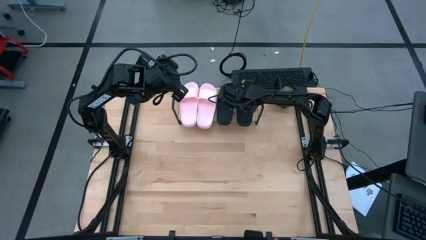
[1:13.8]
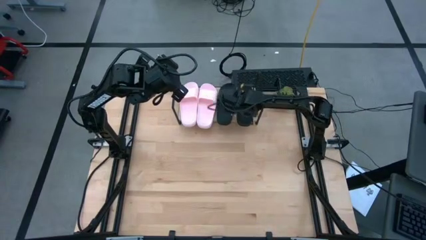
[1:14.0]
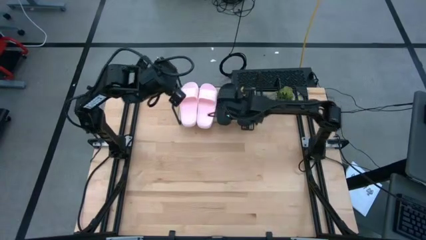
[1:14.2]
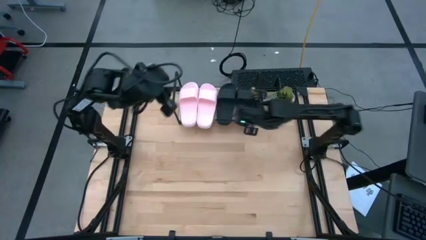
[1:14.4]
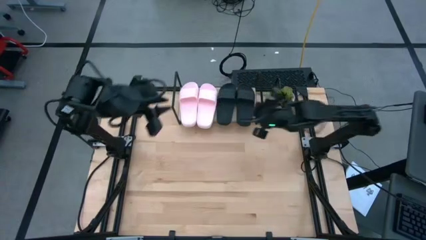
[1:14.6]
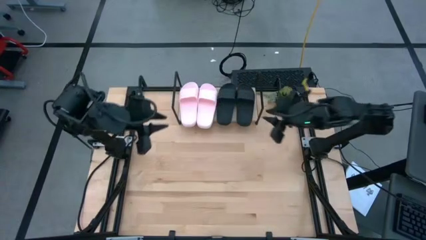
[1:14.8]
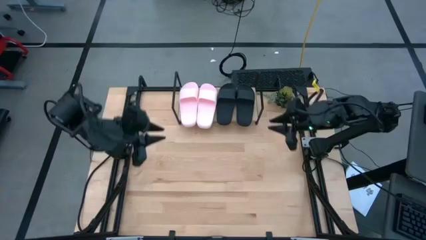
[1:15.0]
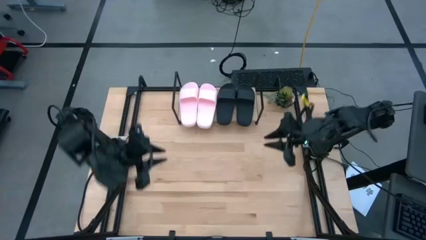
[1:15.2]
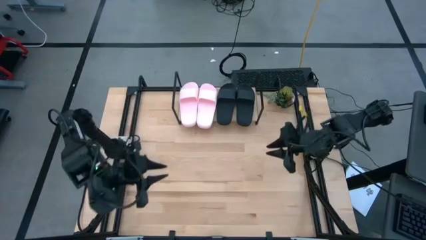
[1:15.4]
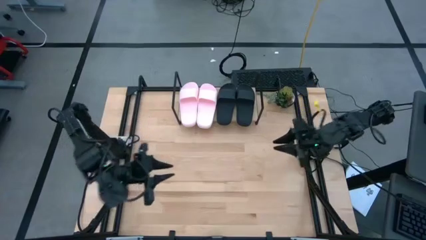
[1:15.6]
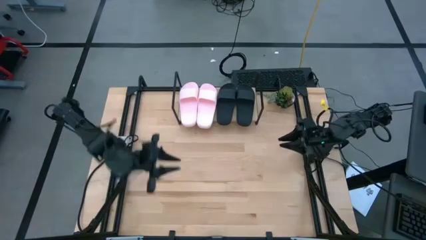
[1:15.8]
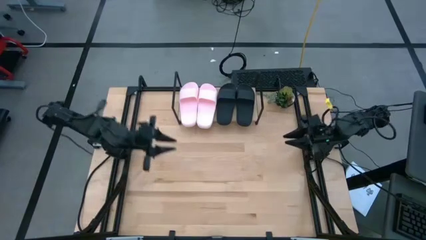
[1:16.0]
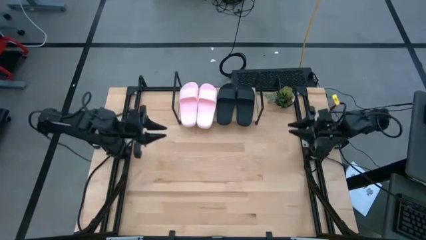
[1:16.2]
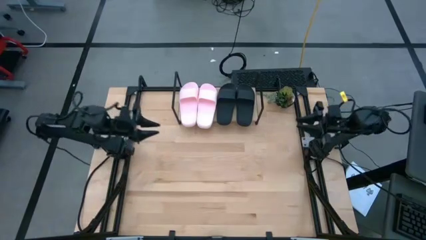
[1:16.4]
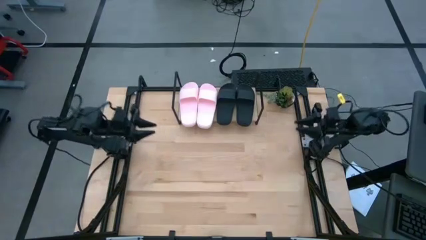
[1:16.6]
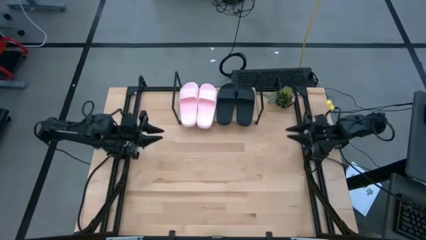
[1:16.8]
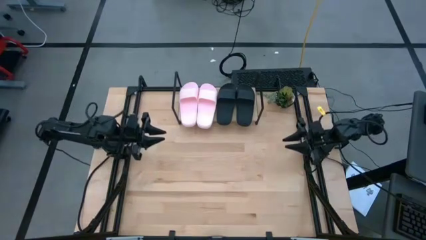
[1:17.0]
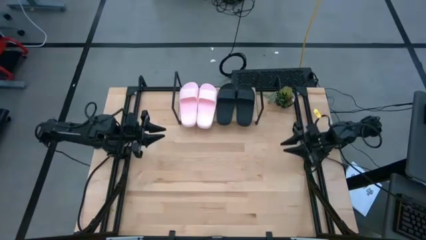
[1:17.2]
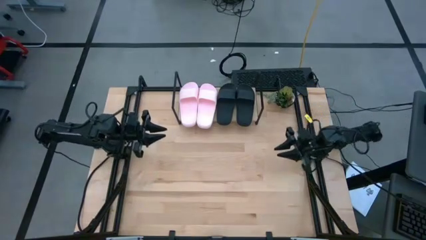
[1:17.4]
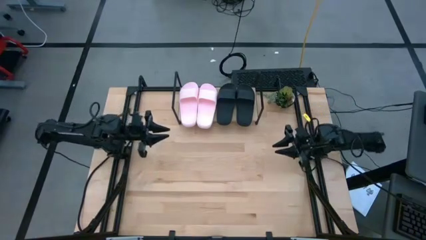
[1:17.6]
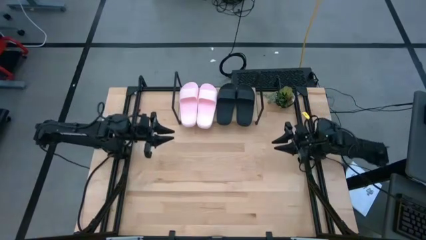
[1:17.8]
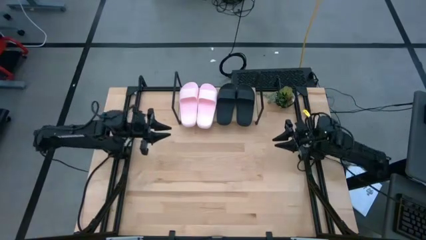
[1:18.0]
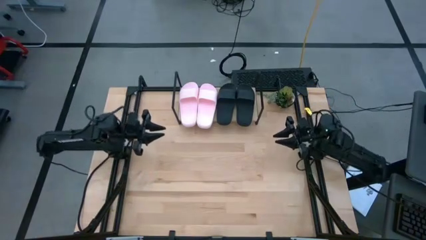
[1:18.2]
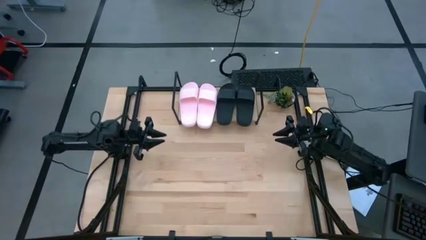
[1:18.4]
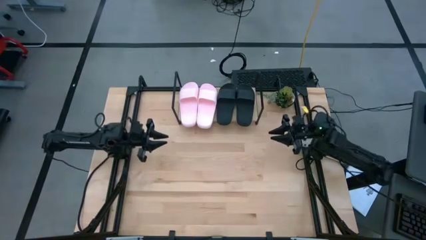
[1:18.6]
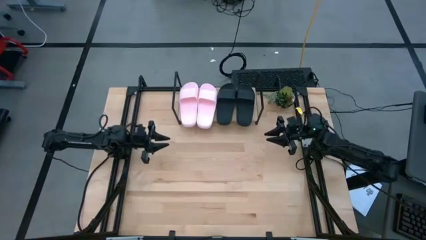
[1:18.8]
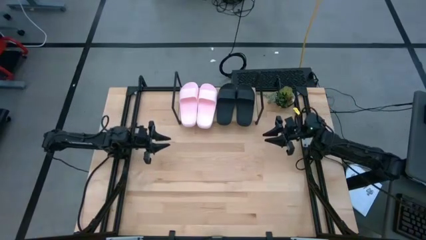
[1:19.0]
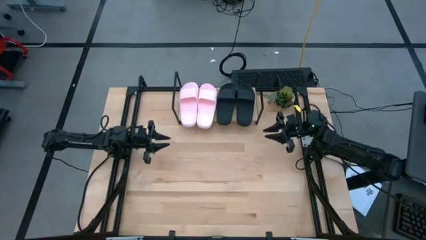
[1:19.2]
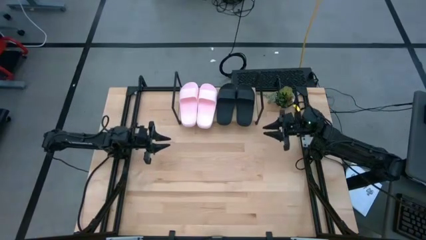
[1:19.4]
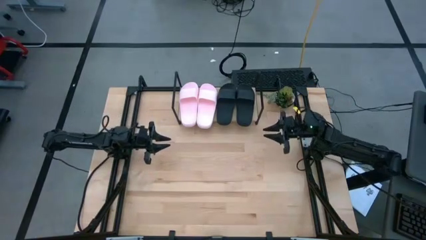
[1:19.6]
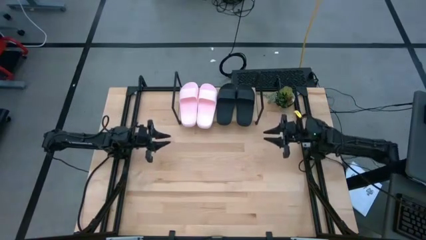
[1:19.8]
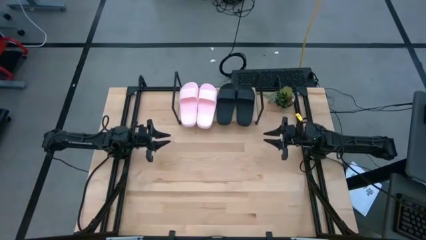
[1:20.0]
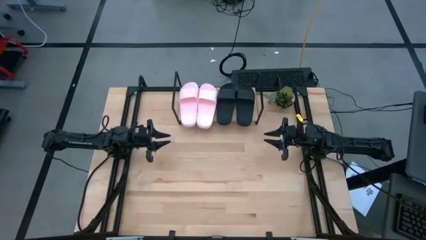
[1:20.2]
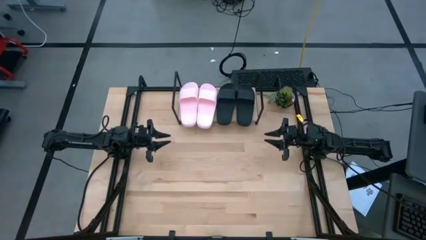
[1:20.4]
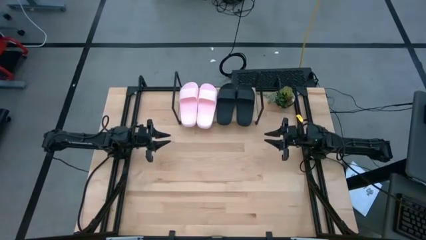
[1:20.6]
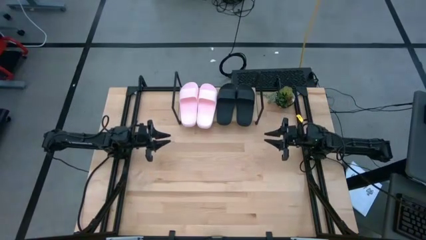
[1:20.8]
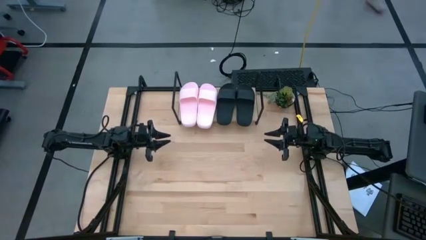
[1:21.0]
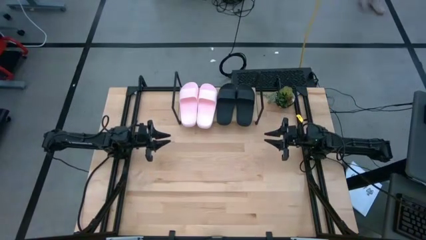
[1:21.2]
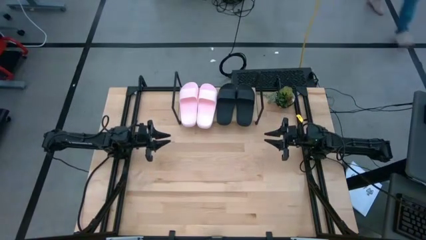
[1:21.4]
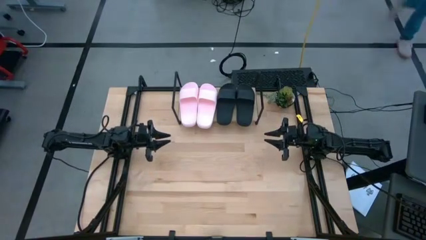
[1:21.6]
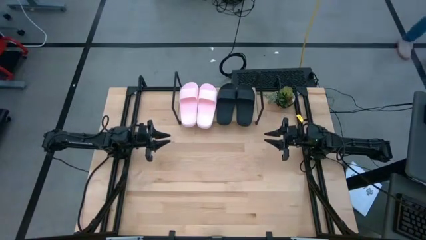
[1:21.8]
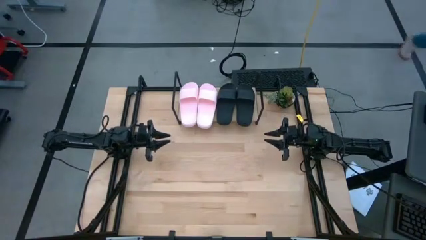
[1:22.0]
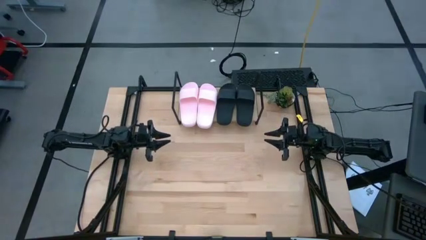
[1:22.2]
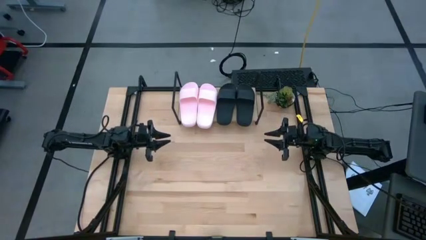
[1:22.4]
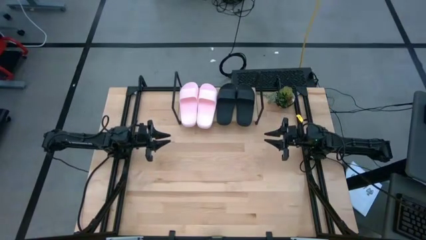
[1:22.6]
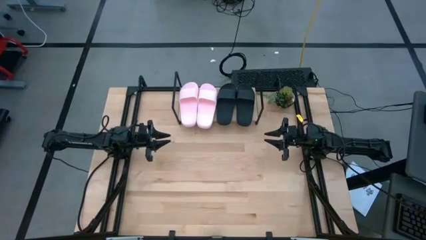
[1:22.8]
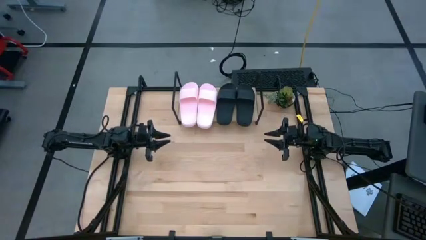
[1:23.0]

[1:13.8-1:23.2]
Task: Pick and place slides into the shelf
Return to Home Position

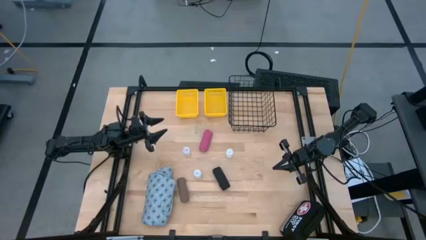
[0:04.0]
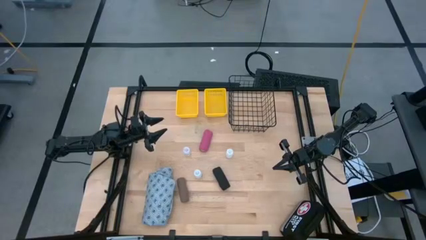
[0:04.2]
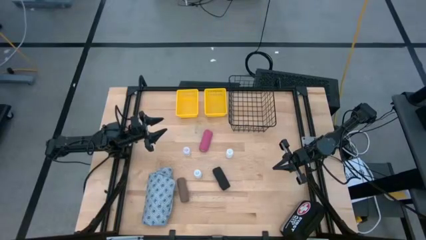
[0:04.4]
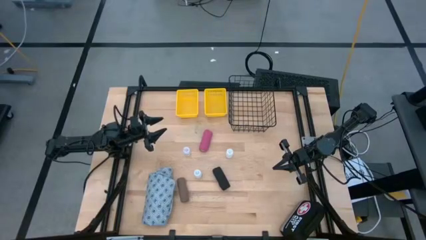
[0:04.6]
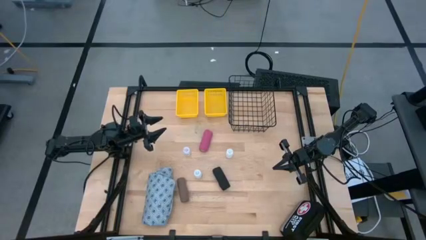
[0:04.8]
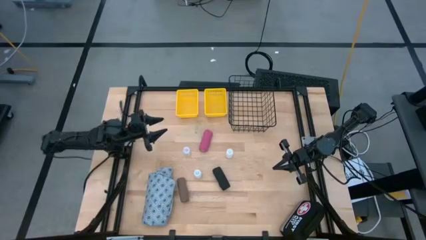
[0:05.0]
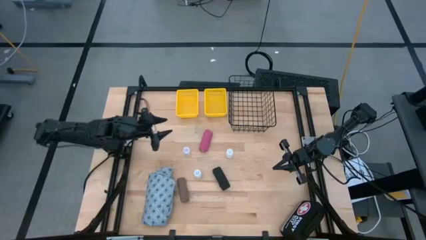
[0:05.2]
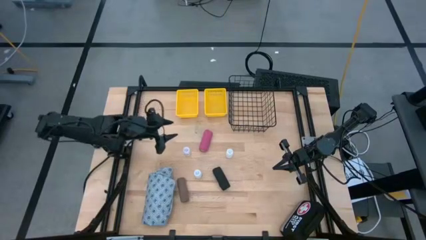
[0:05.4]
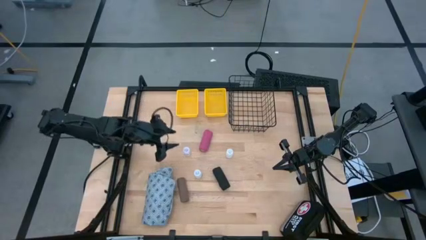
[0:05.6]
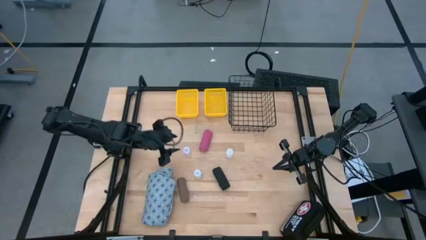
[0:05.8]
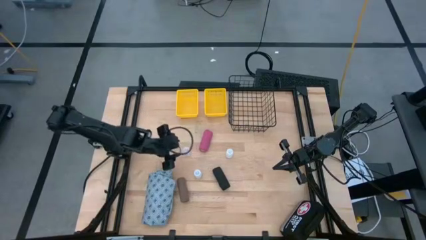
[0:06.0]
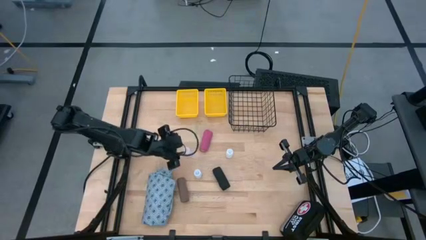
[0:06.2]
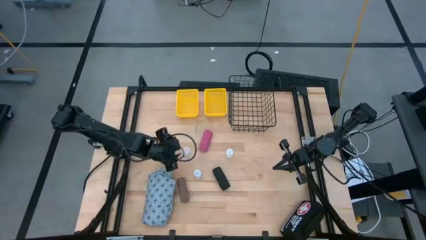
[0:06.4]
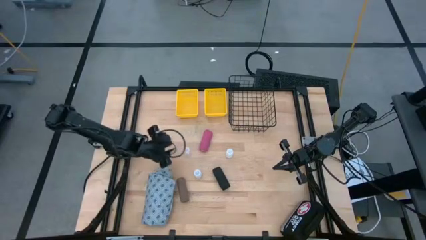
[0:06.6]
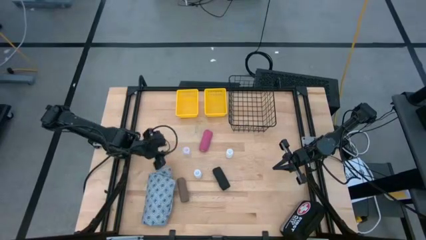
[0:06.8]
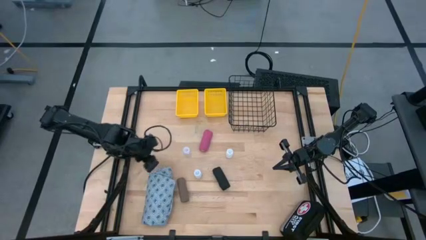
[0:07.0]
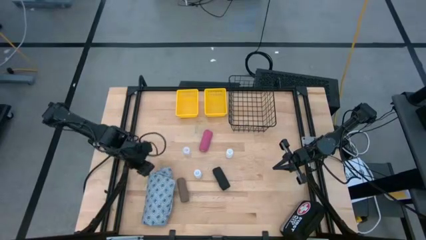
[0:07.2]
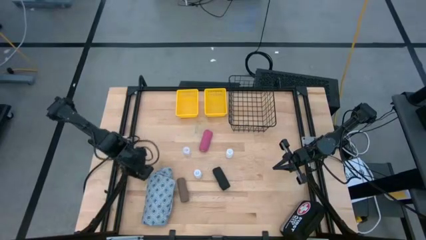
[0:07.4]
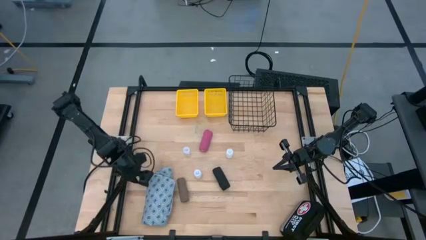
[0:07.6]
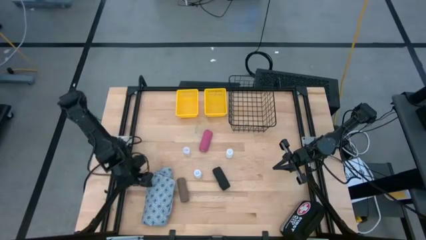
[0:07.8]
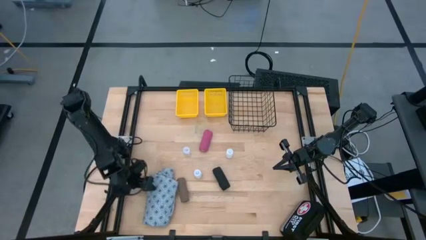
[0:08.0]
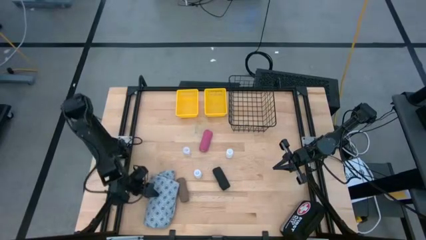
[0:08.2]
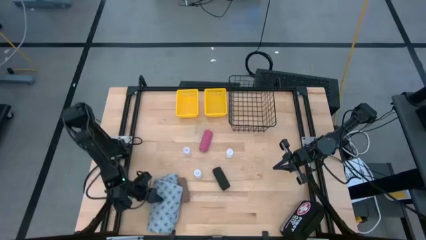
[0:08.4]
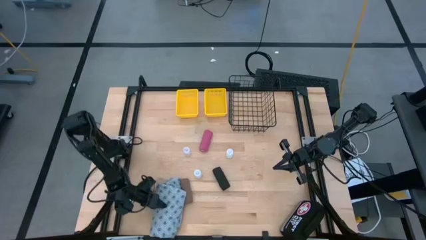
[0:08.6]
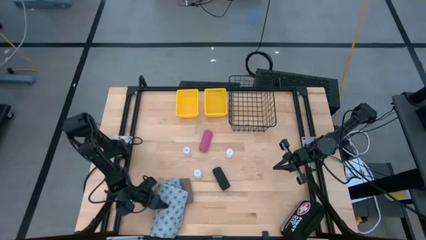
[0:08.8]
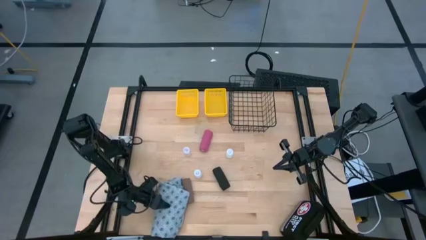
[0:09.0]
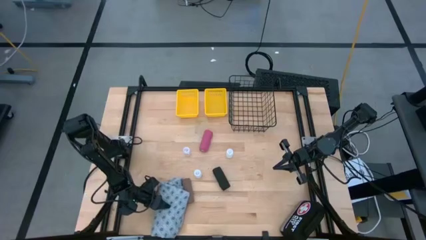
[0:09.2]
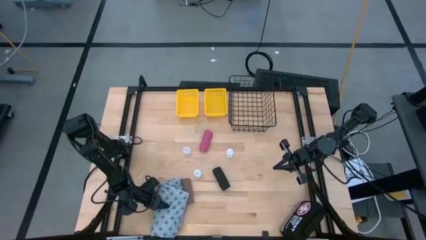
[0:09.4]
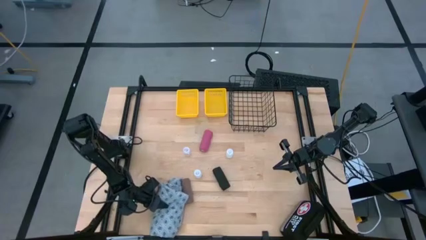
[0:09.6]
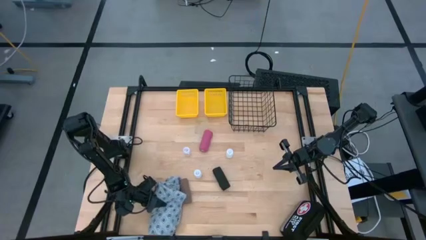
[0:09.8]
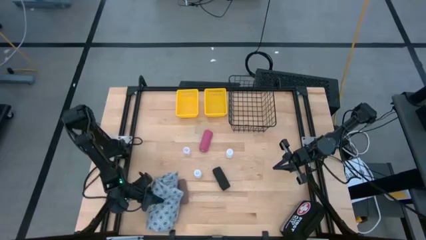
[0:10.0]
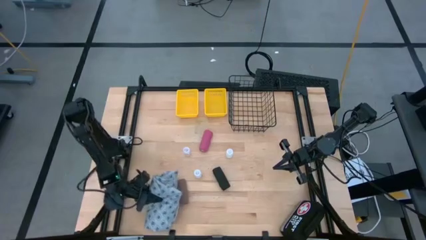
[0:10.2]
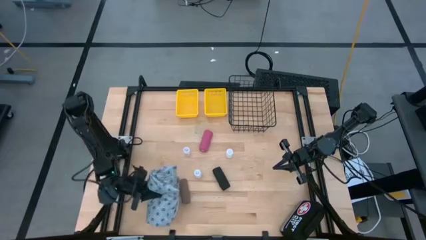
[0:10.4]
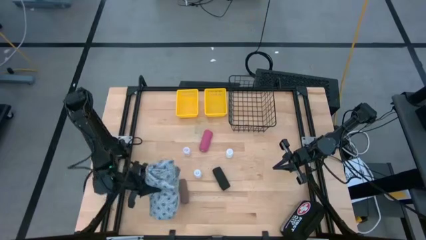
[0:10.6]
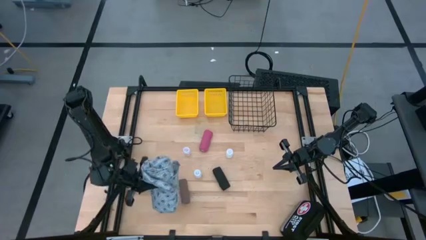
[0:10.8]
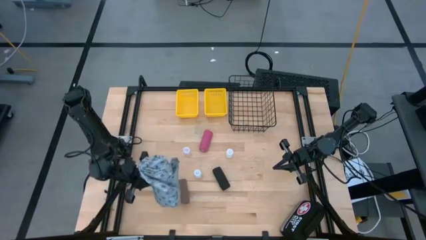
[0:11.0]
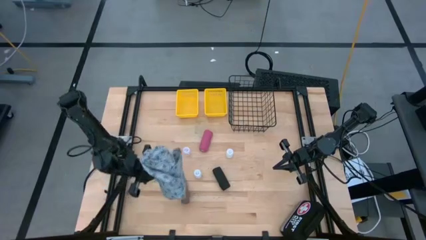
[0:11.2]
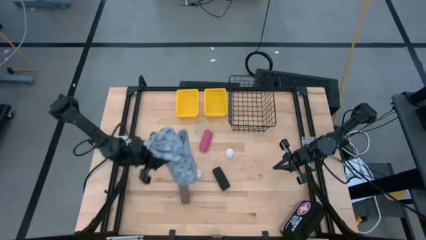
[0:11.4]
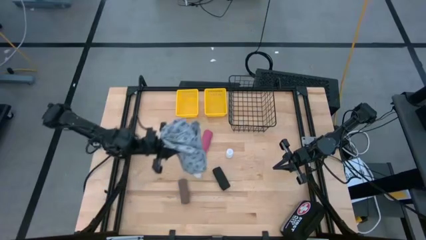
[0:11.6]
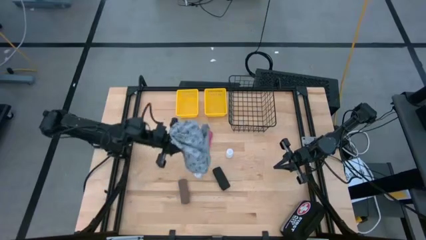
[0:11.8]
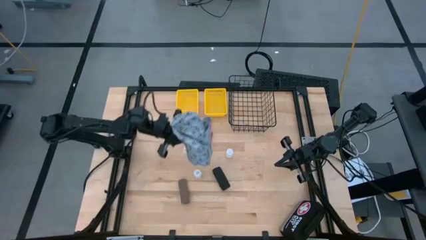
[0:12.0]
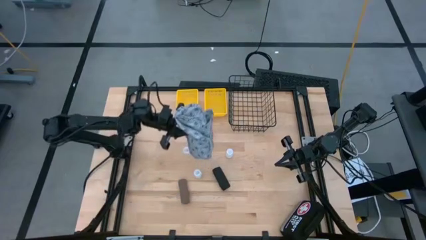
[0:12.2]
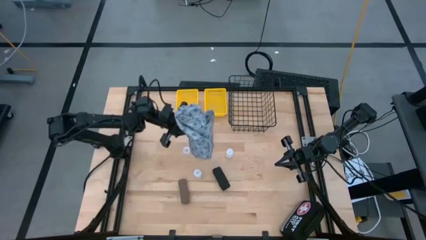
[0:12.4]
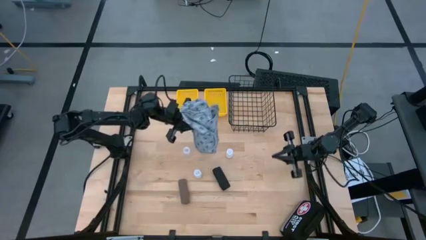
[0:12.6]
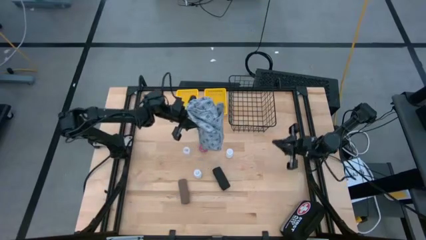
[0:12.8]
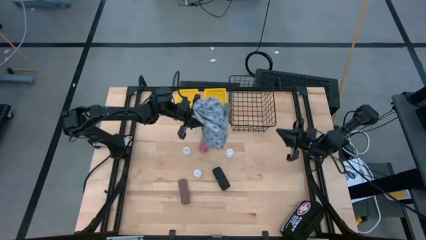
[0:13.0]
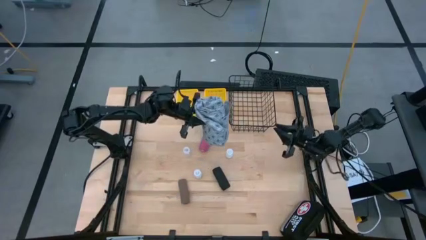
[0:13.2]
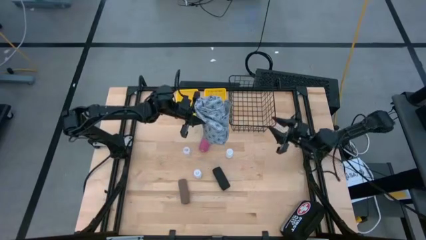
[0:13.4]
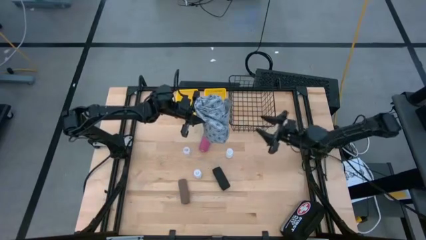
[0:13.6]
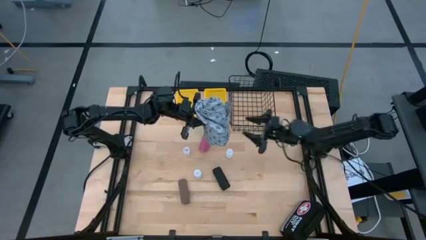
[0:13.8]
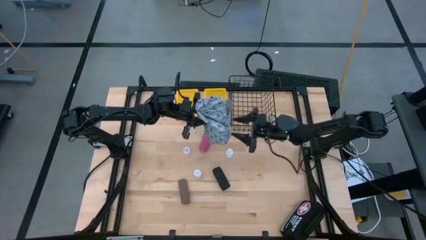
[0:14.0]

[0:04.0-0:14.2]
Task: Pick & Place Medicine items
Put the gray patient gown into the black wire basket
